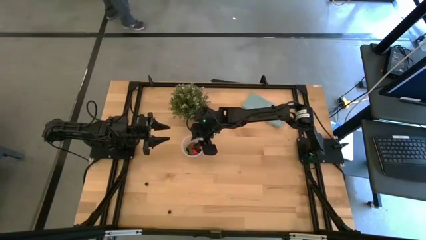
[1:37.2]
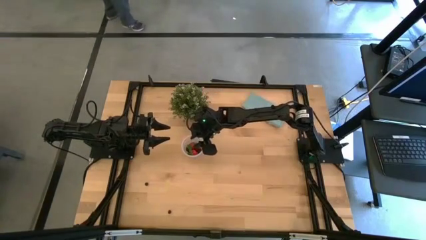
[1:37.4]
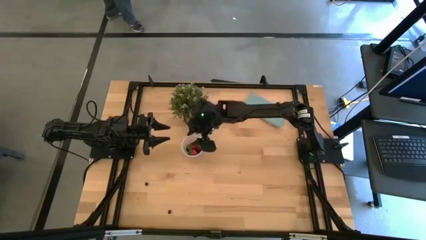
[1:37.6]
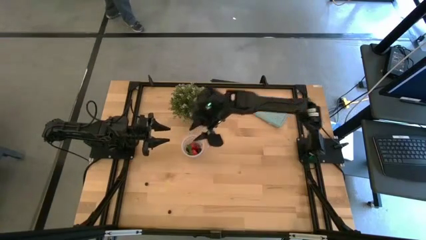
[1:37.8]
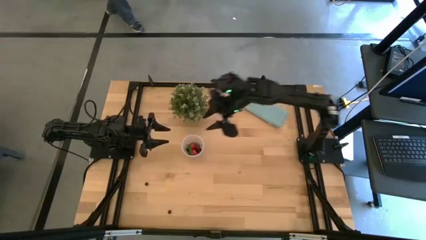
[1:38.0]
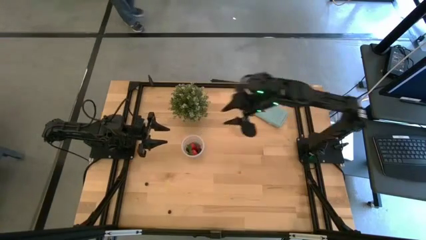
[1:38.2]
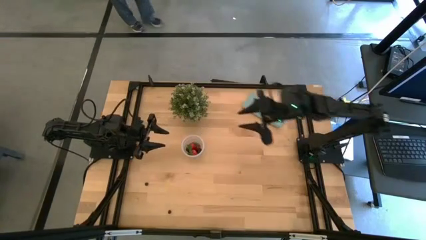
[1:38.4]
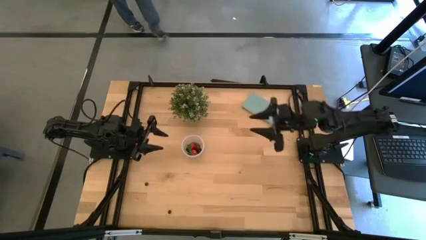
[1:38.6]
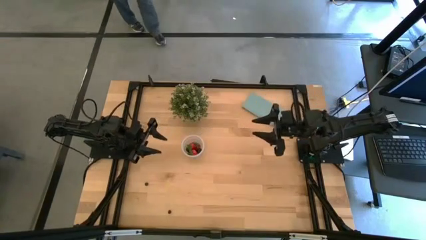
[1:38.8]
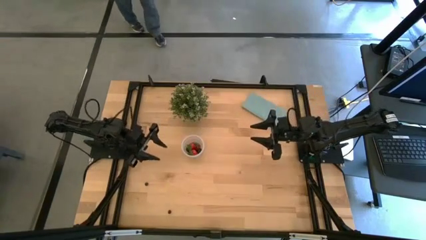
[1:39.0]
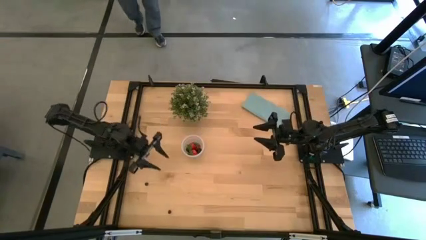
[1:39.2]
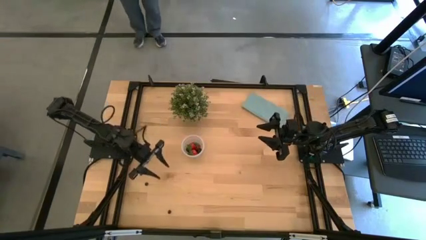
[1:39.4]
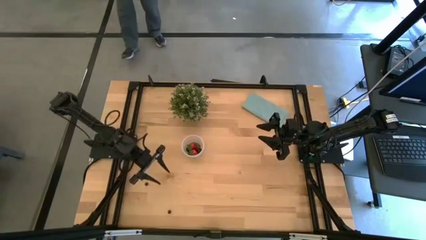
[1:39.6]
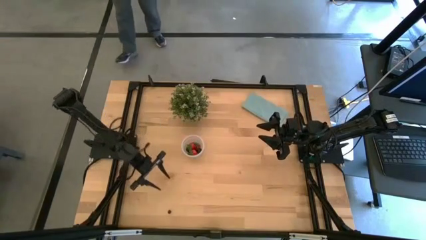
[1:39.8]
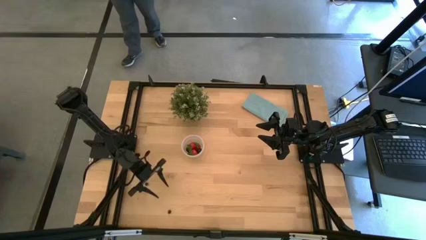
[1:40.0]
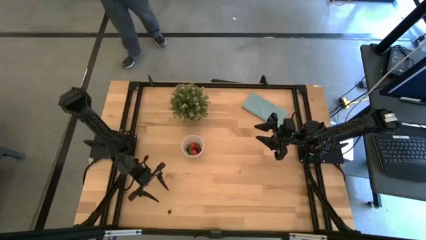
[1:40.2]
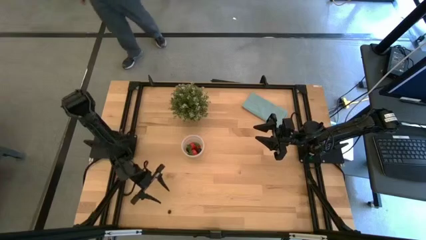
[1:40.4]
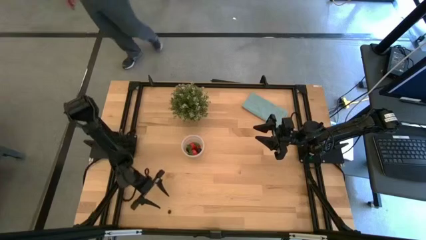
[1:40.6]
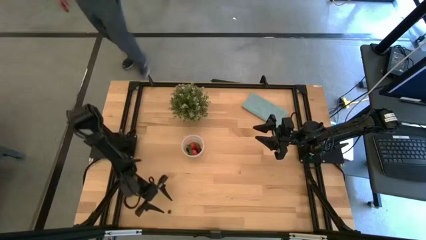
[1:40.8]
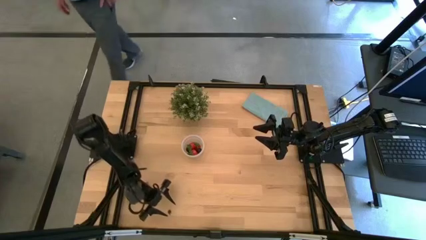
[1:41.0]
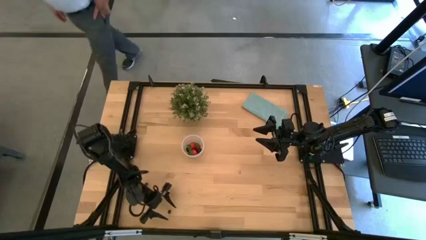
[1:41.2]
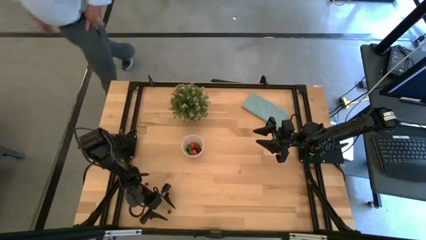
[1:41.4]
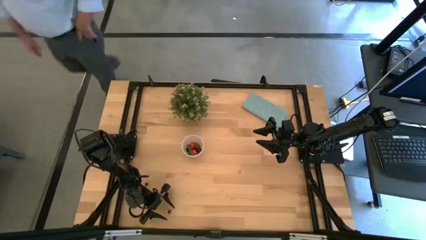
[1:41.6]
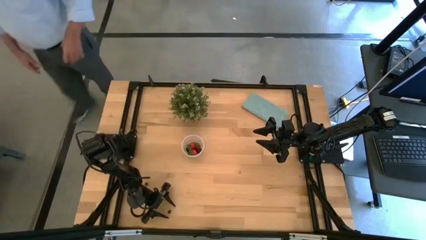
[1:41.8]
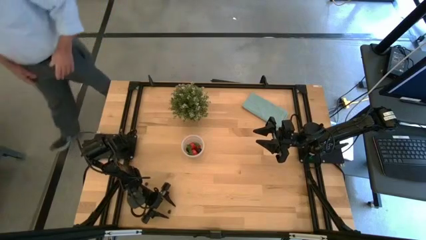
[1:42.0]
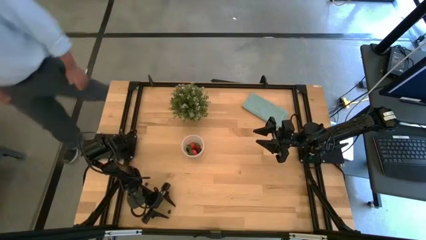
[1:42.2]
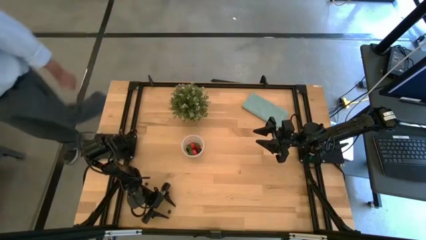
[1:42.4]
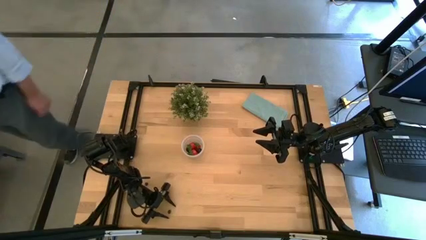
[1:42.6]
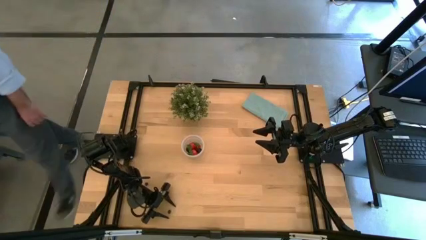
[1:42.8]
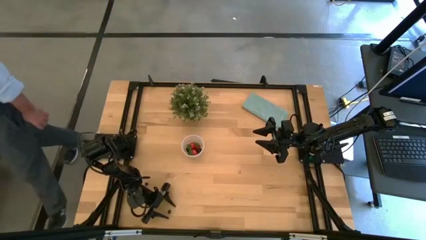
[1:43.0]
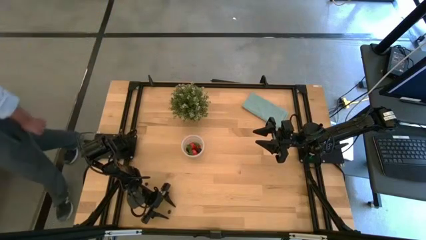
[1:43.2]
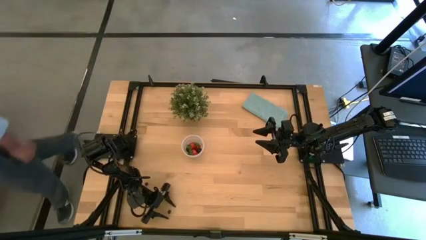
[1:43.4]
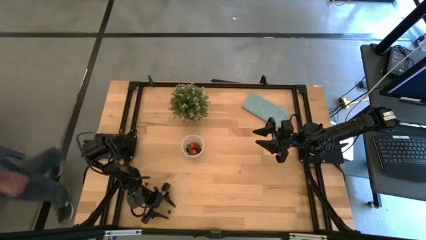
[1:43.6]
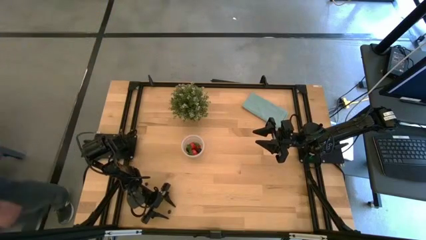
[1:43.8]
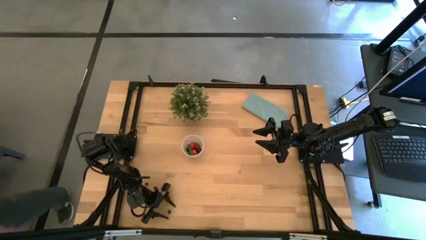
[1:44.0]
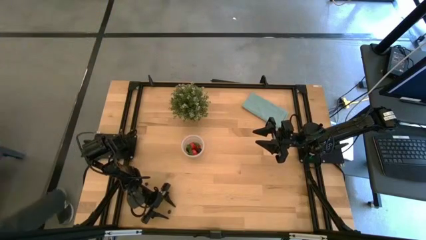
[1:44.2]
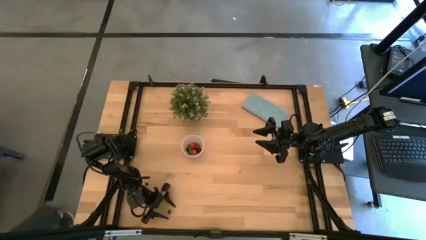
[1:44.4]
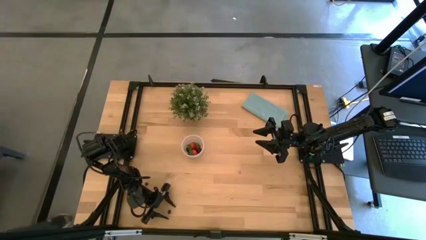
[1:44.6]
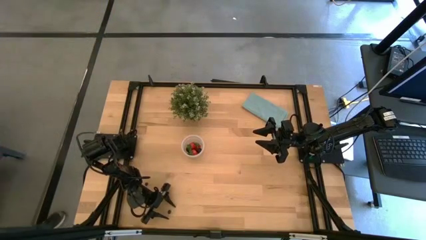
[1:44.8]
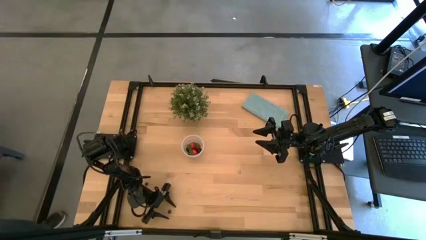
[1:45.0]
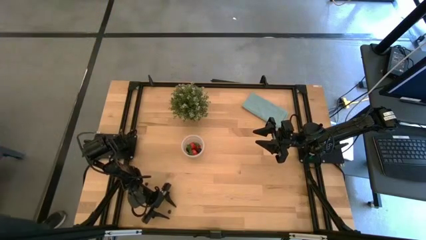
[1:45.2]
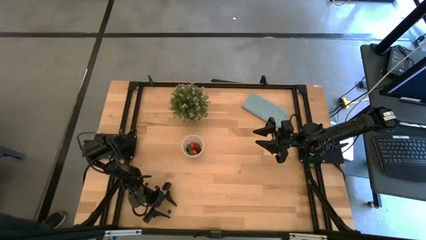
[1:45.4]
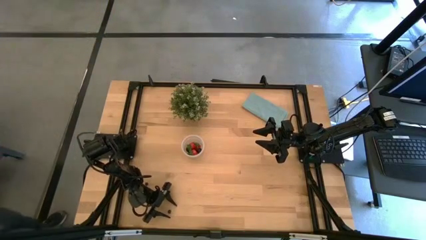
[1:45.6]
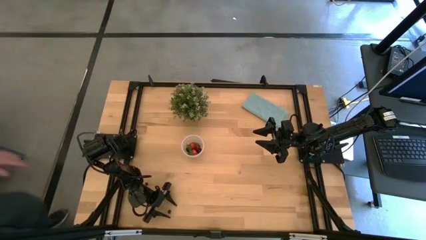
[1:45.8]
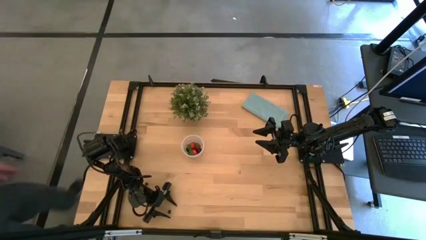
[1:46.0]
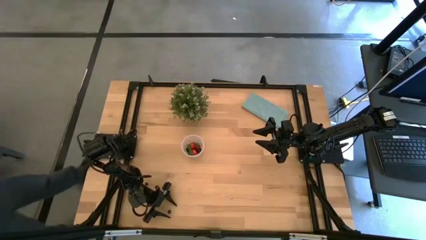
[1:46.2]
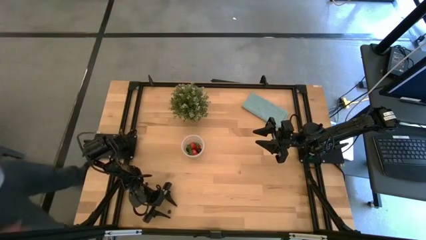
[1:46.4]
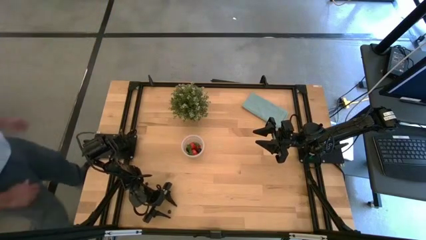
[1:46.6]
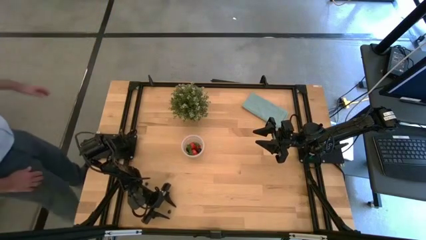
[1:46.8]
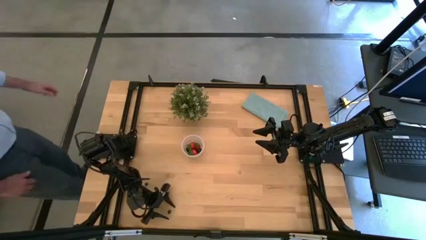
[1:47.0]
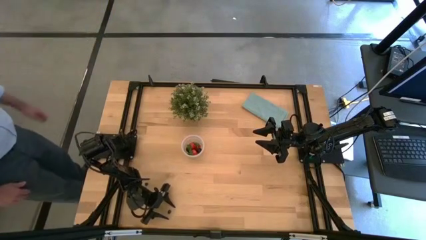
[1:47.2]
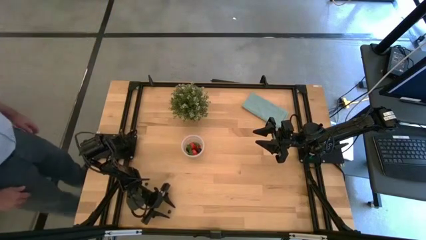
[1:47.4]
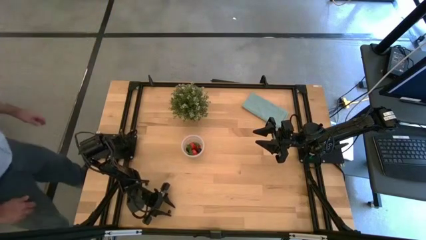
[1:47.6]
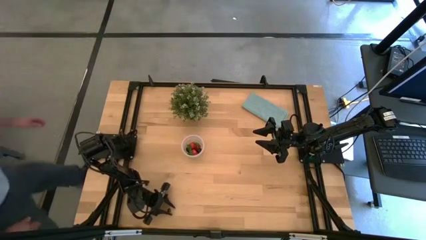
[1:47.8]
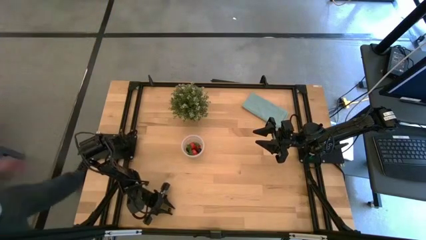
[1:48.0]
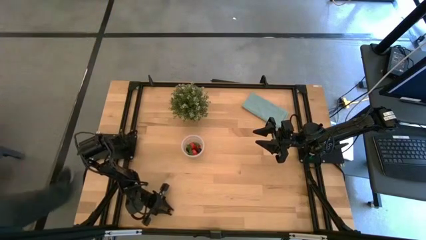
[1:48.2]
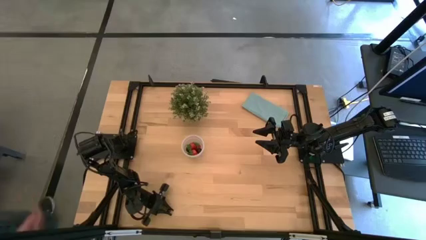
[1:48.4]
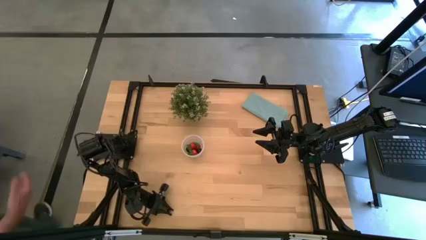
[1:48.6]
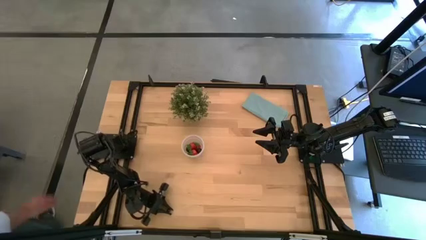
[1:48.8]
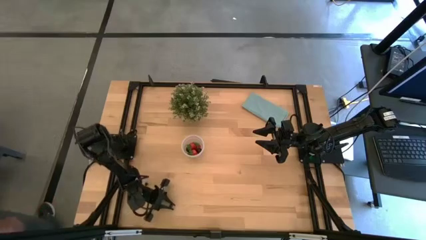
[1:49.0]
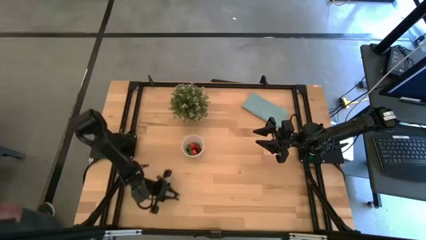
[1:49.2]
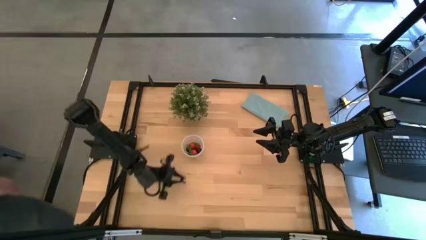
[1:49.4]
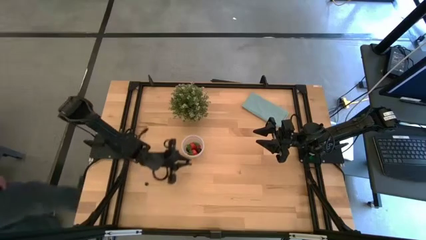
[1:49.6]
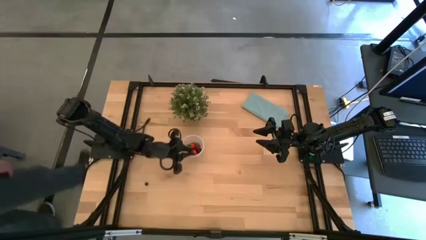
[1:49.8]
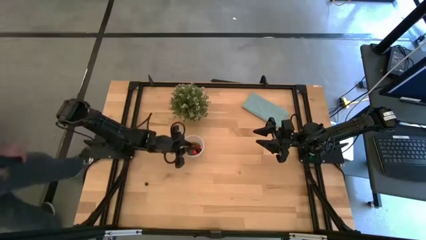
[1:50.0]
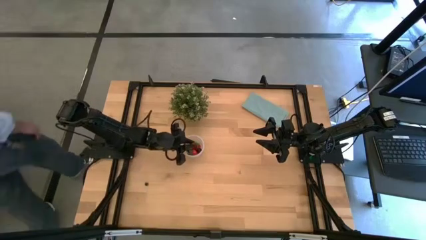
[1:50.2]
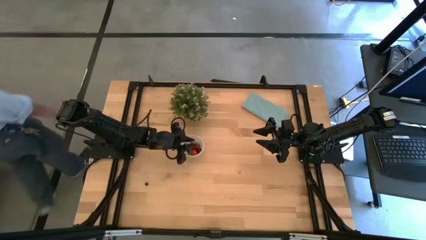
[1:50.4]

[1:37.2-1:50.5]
Task: Pick and placing Produce into tupperware
Put the blueberry into the transparent container

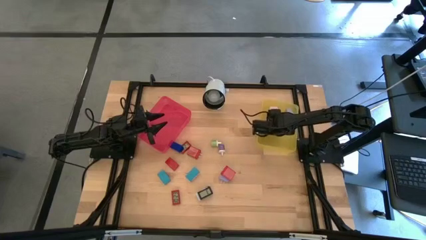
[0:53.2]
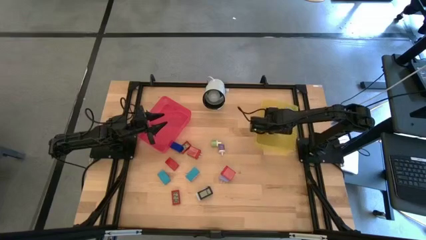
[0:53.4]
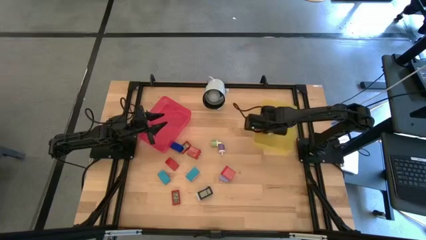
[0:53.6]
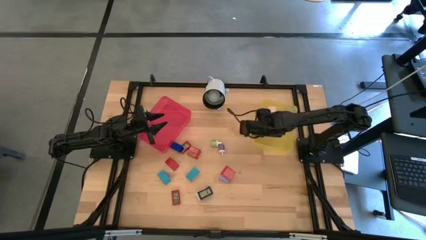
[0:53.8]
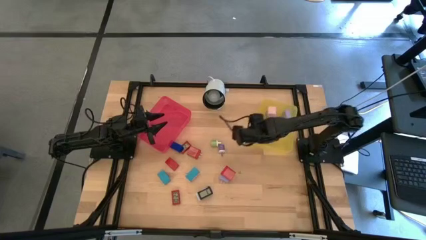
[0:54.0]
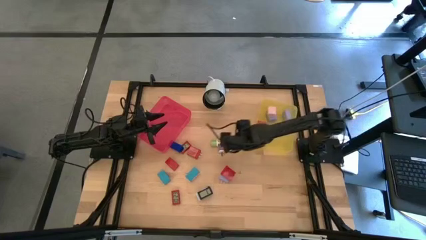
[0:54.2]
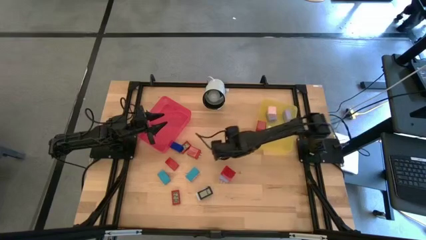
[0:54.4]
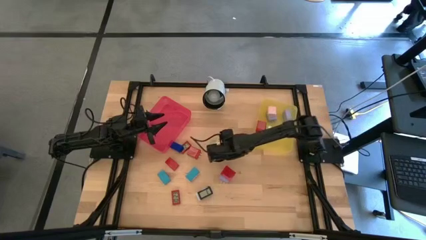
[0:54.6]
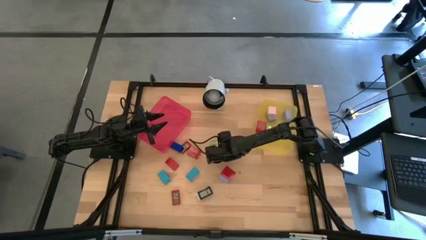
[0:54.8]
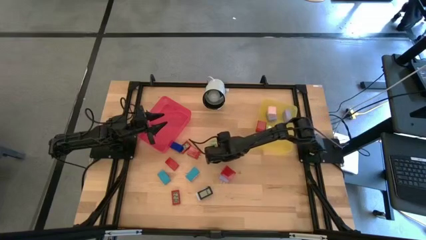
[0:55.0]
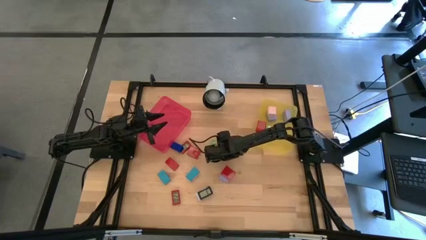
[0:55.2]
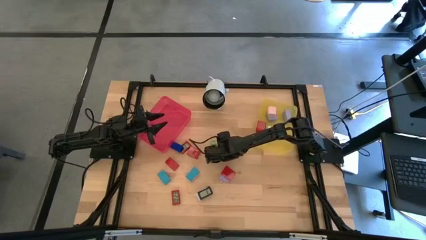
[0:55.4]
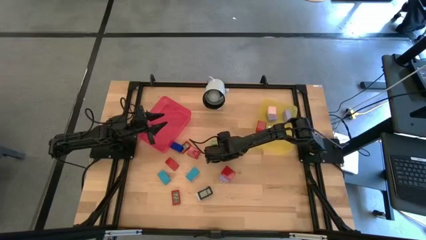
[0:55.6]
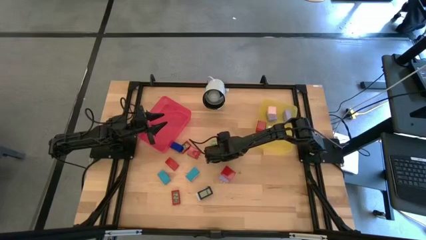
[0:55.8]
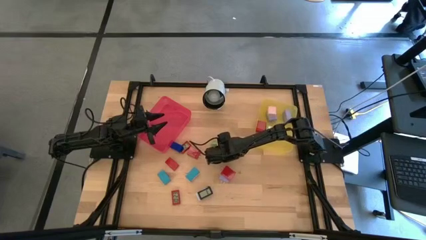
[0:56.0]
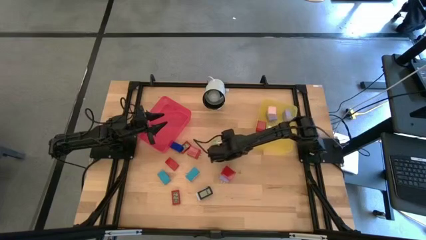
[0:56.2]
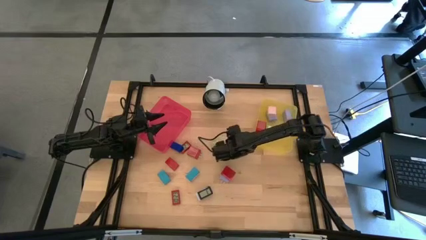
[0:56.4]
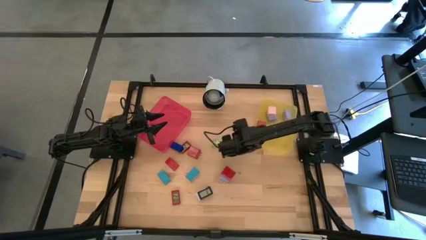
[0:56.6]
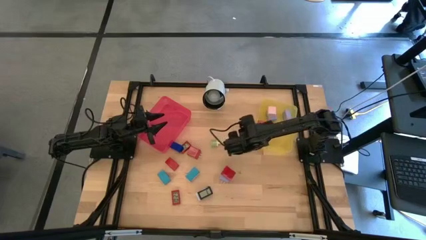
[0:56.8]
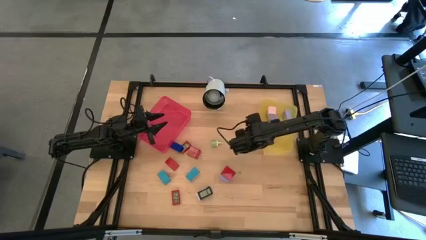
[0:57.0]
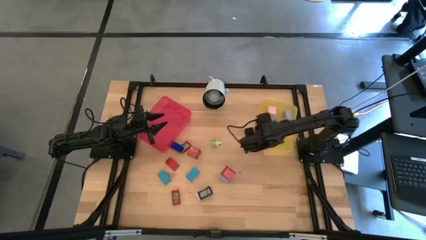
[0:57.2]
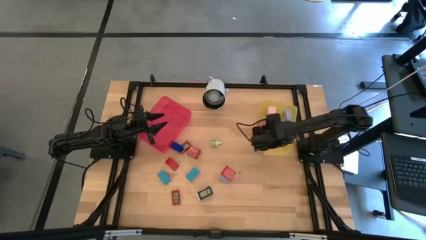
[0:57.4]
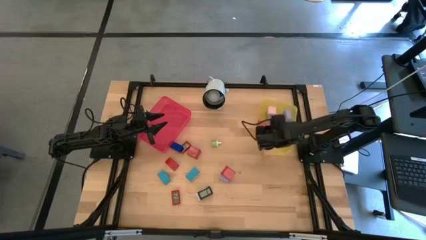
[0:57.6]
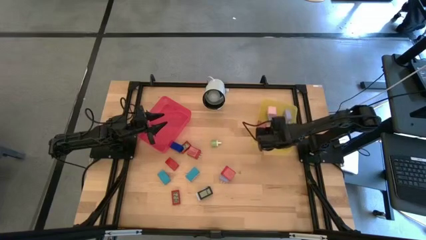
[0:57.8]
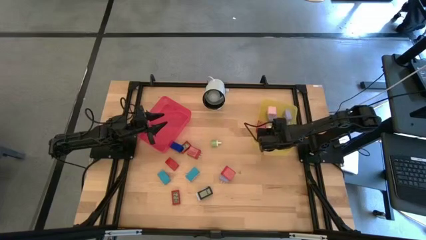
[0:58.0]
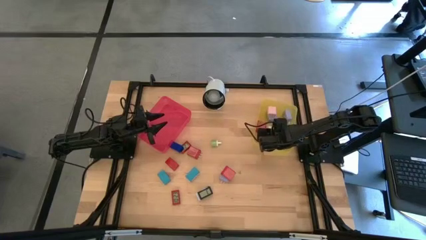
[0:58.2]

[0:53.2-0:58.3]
Task: Pick & Place Office items
Put the blue white charger adapter into the yellow bin
